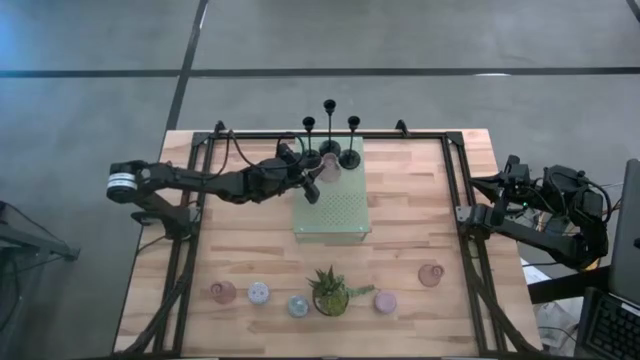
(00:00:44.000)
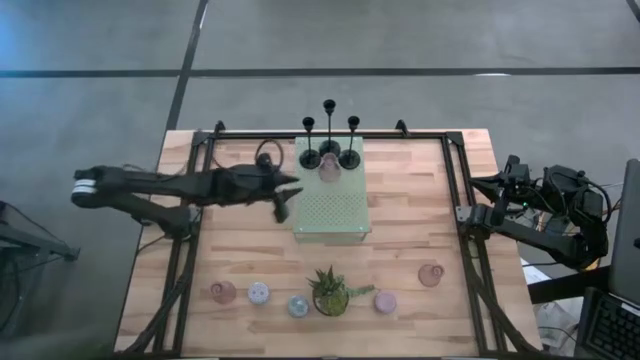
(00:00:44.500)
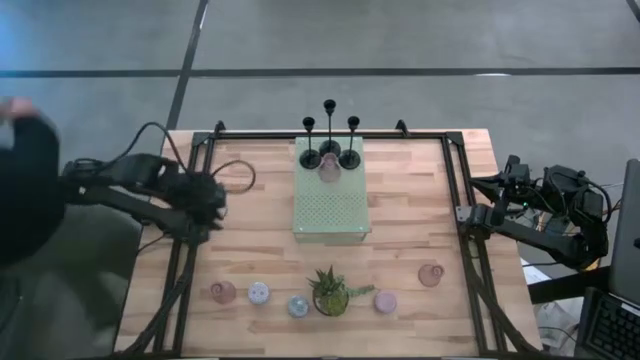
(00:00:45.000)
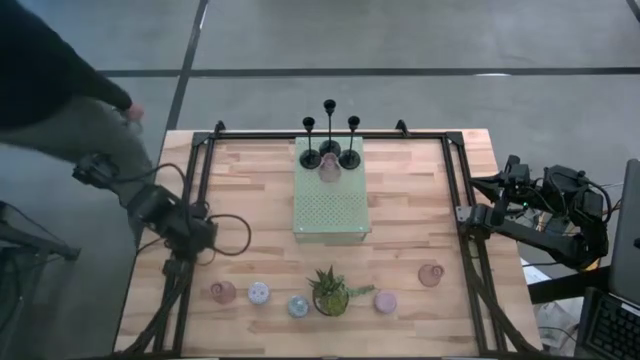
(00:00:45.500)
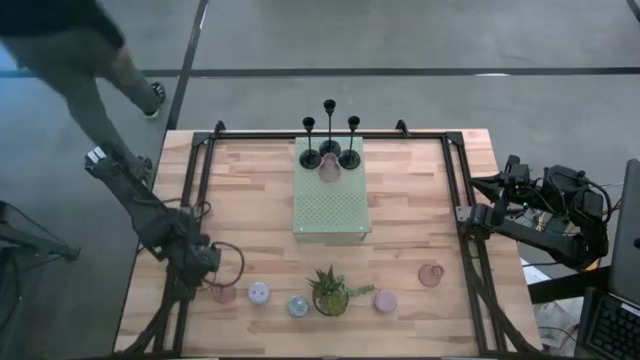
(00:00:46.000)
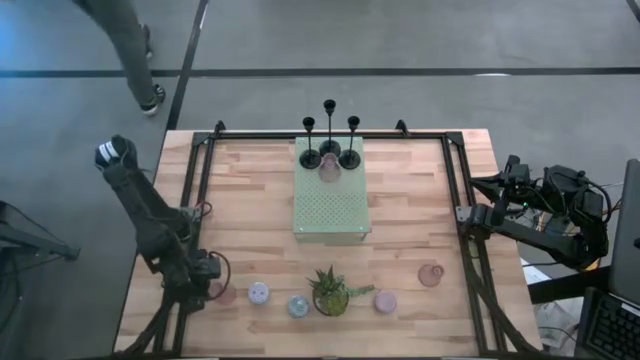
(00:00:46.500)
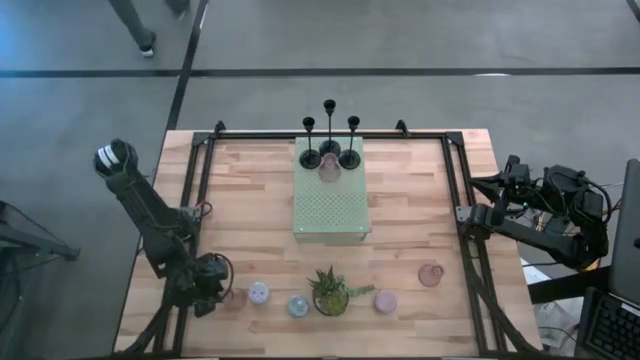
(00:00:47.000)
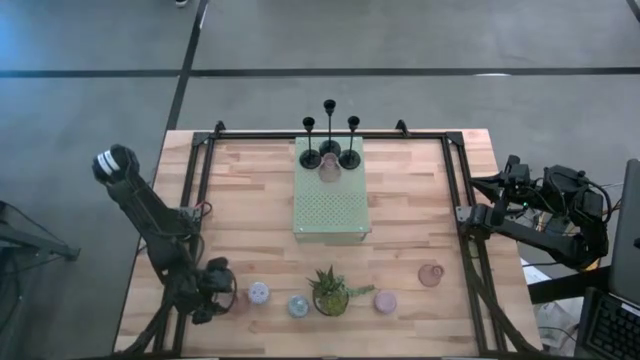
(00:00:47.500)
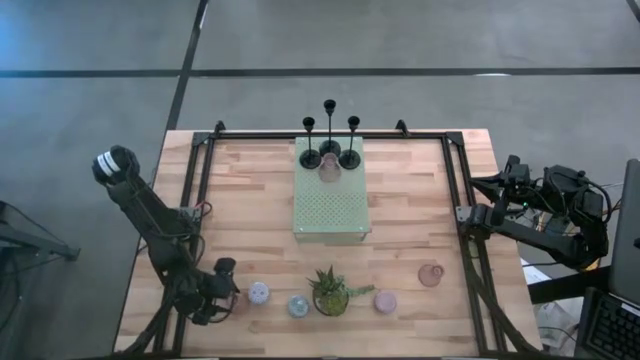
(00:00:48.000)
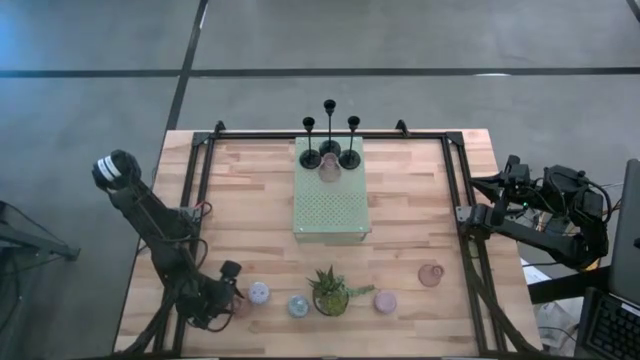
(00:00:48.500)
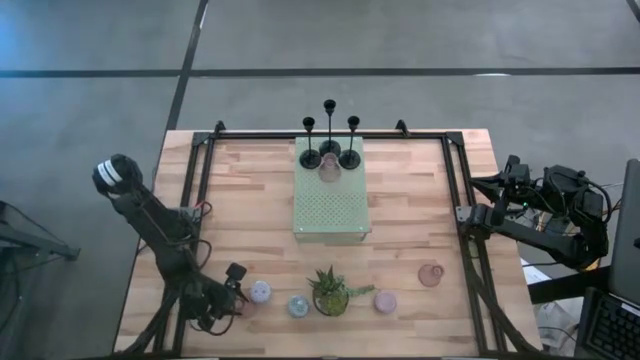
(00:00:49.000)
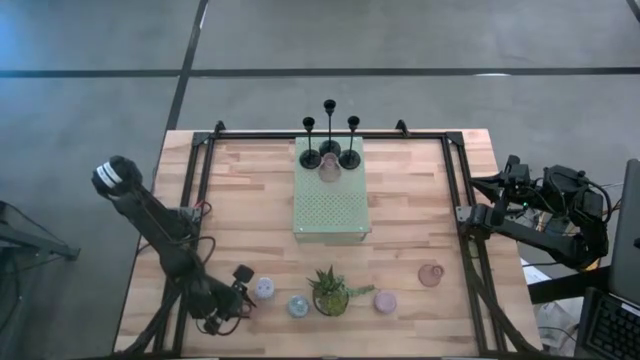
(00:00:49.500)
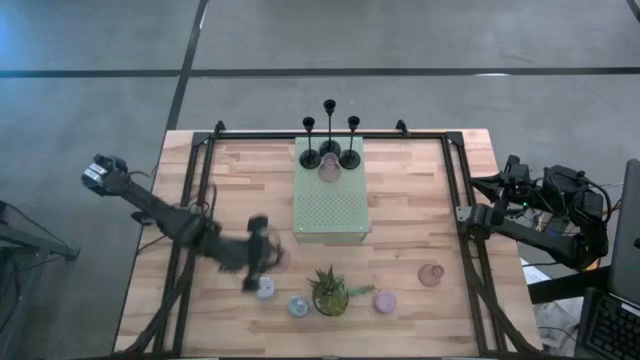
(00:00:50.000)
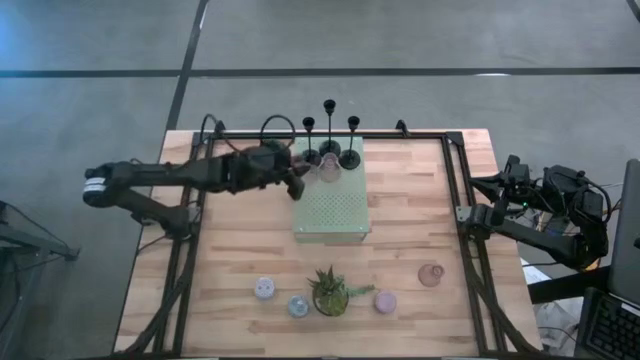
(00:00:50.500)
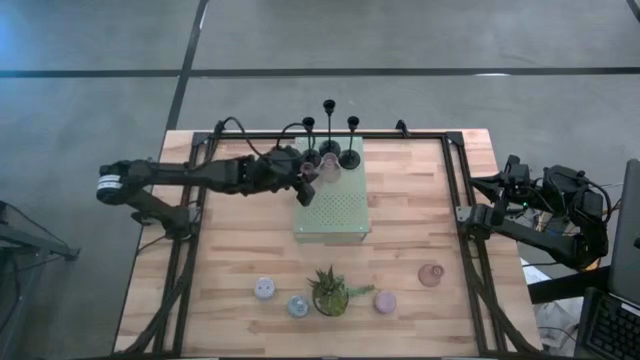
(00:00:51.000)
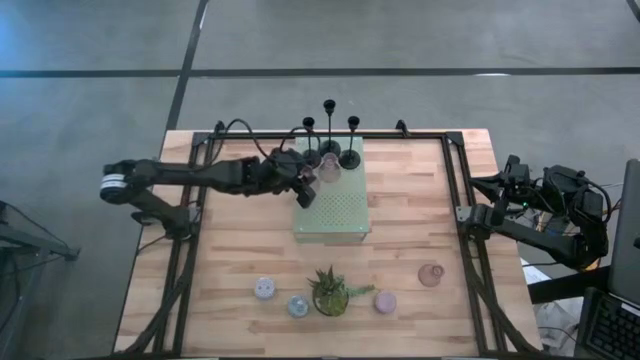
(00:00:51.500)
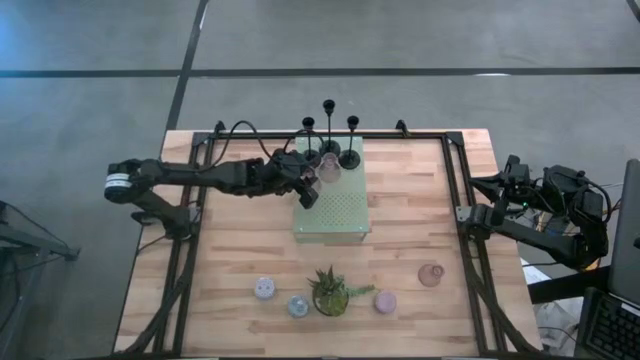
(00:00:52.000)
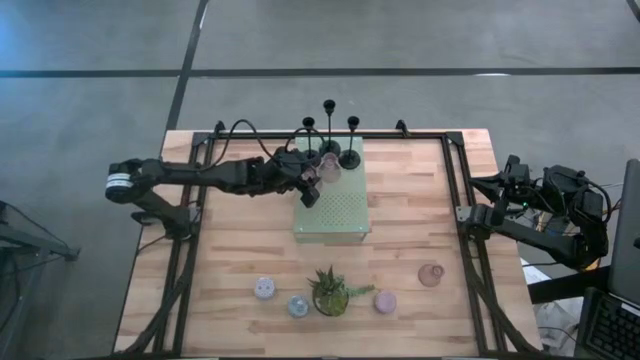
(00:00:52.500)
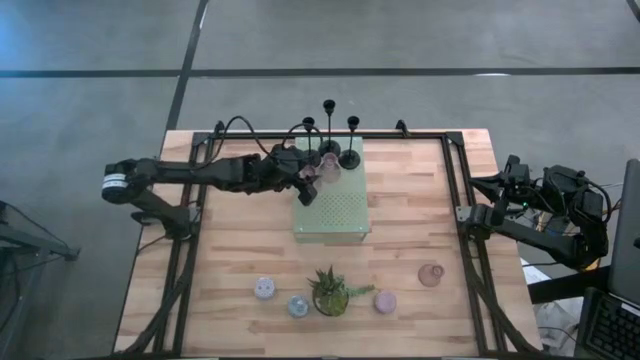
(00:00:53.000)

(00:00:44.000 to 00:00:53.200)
Task: Pick & Place candle stick holders
Put the left pink candle holder on the shelf

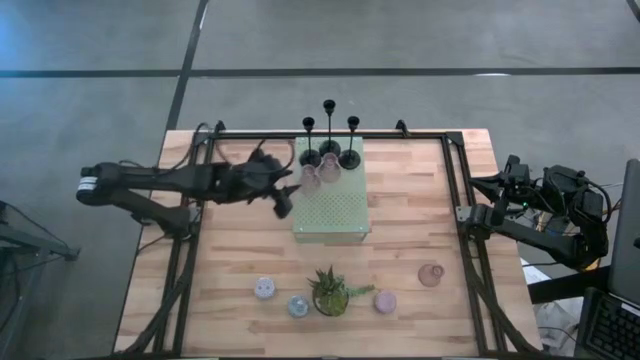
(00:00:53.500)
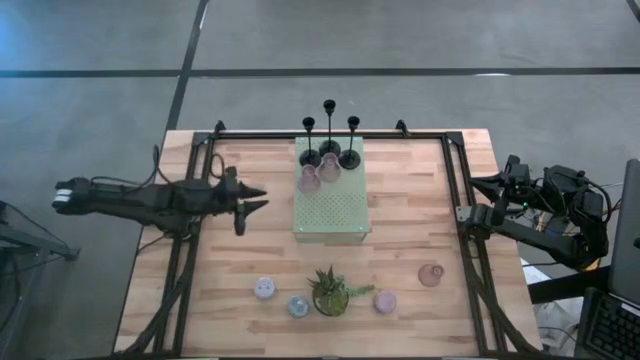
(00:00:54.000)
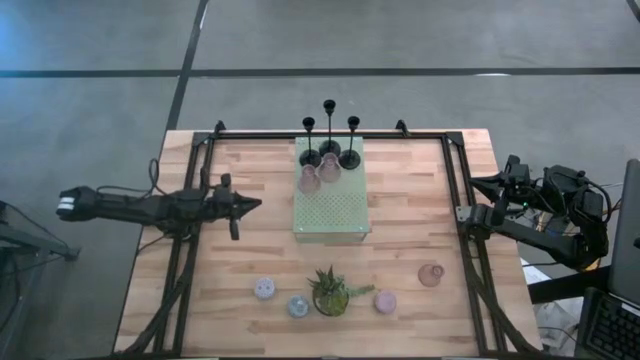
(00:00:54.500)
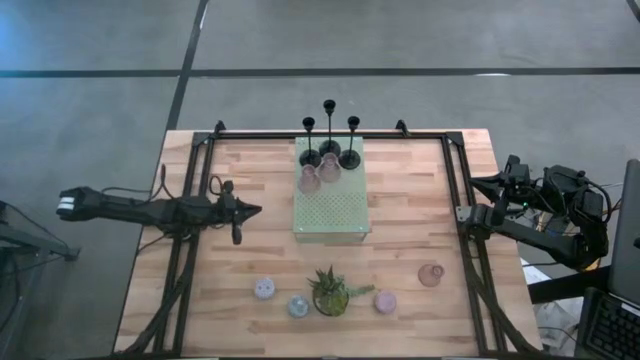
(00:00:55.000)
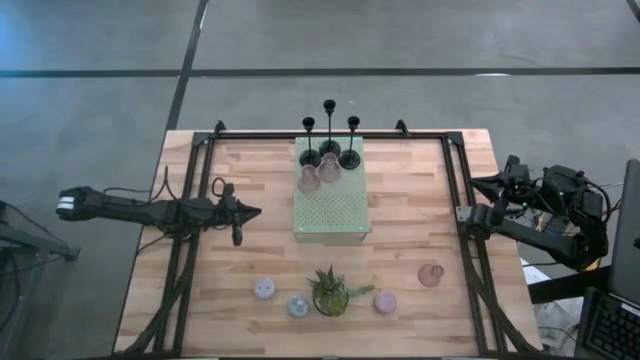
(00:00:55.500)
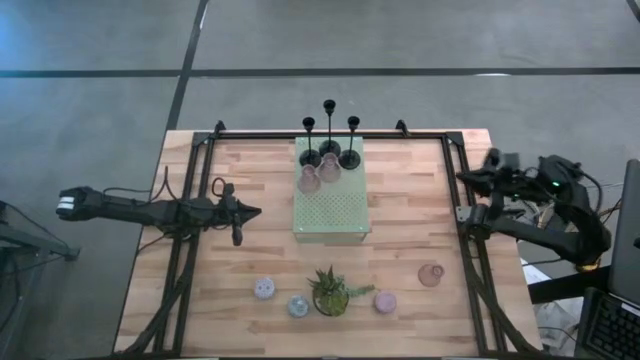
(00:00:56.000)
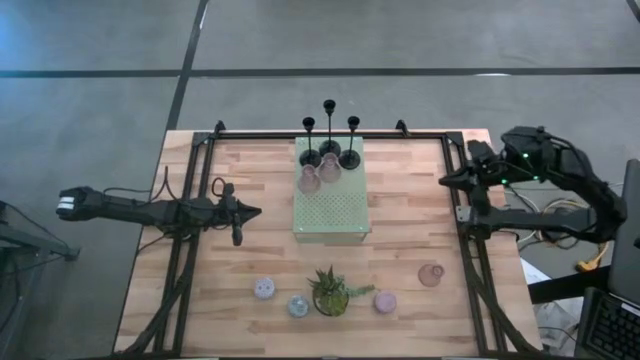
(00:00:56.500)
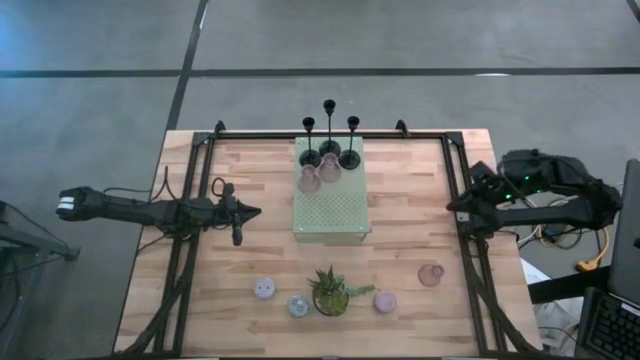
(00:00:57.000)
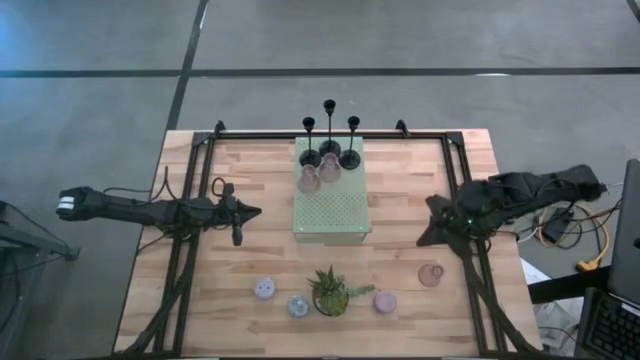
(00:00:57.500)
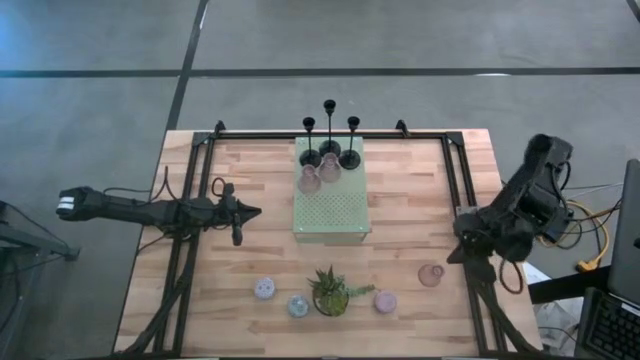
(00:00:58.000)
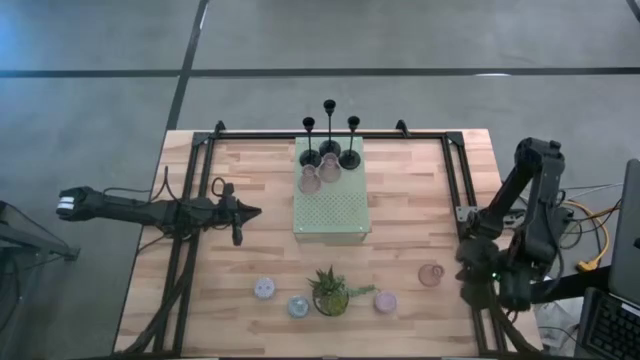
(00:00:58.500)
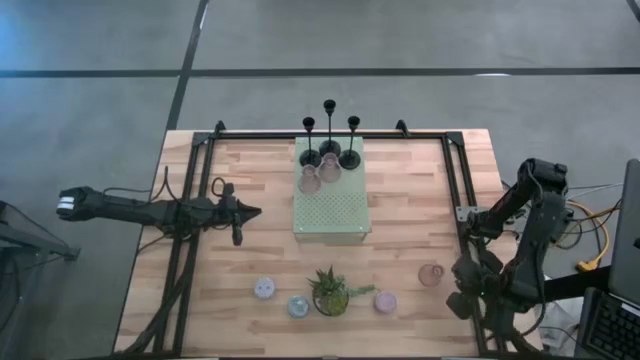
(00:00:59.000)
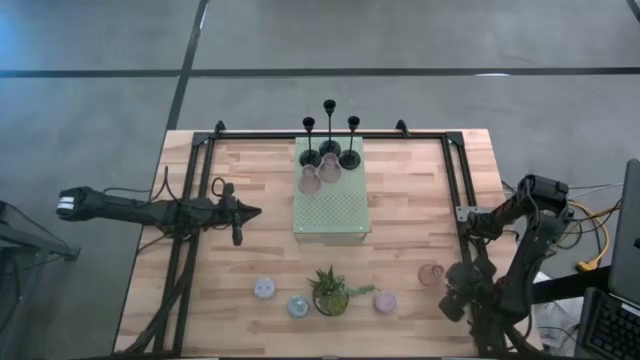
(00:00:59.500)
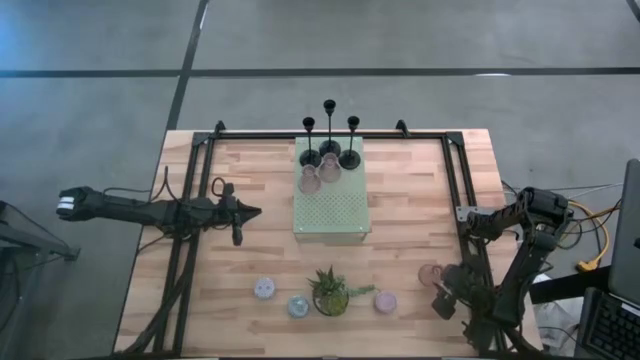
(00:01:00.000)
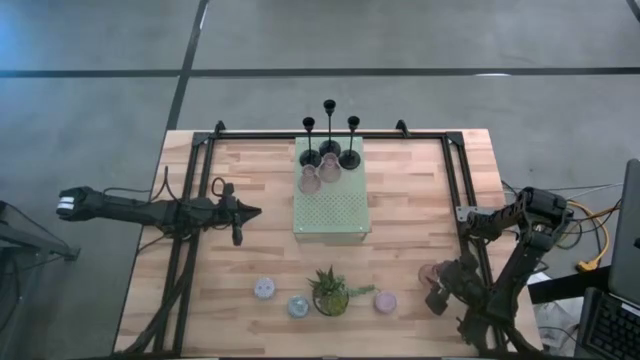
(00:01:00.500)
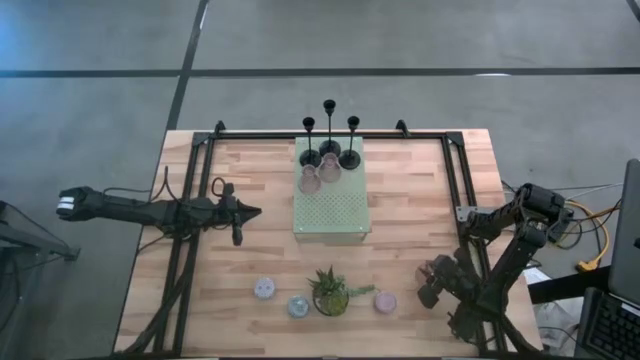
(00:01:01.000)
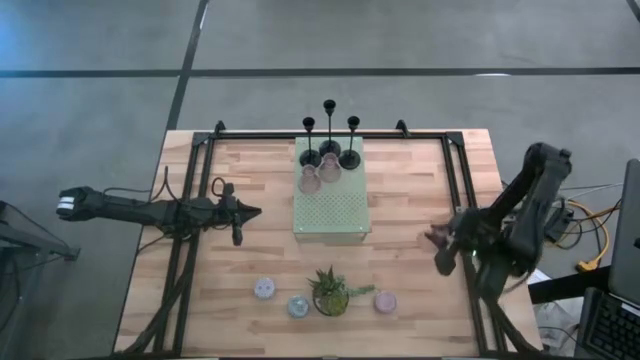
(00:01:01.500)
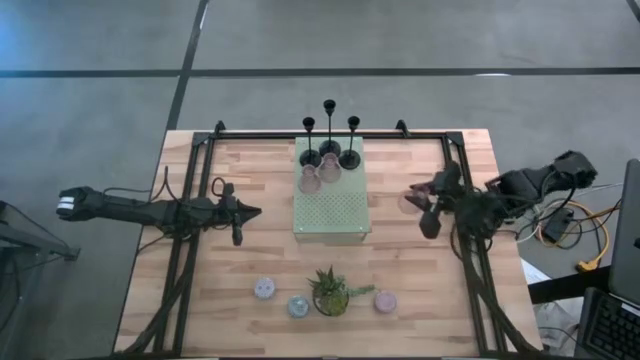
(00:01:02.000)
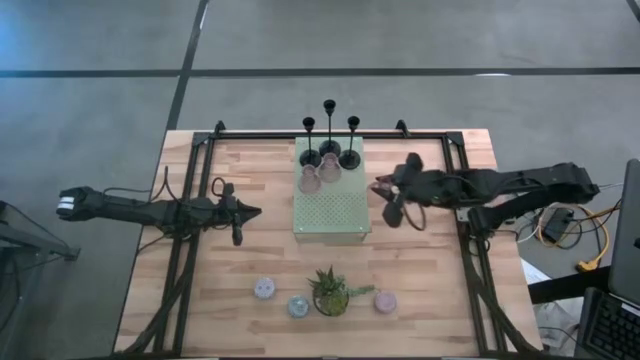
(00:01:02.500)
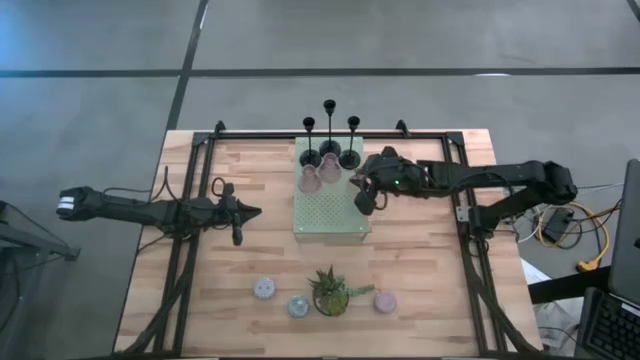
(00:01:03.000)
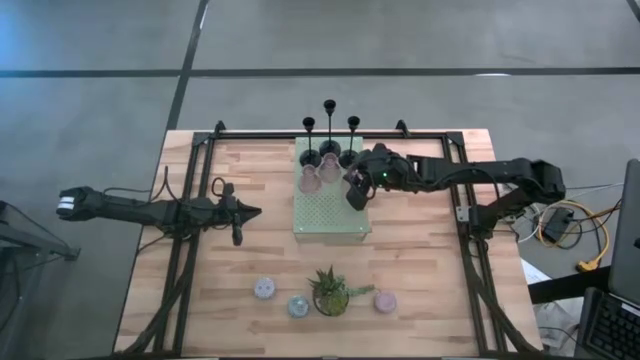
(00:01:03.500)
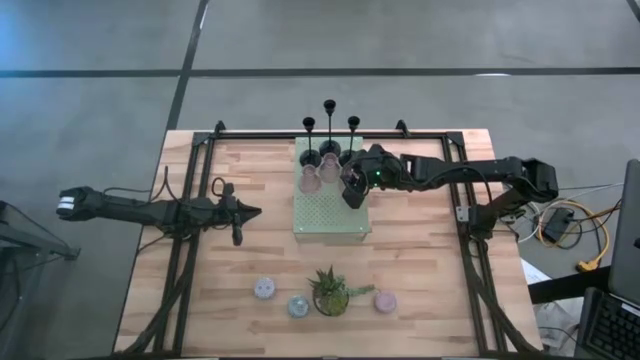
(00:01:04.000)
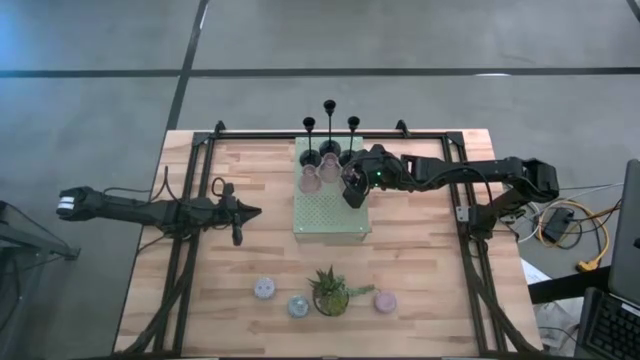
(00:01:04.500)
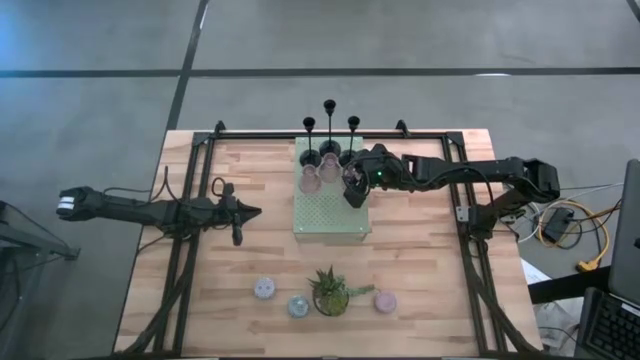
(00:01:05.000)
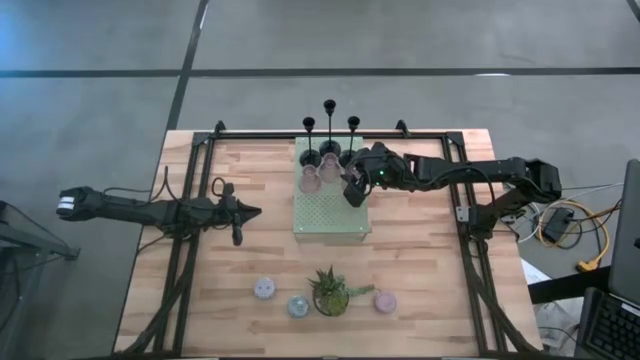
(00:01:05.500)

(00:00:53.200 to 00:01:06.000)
Put the pink candle holder on the shelf
